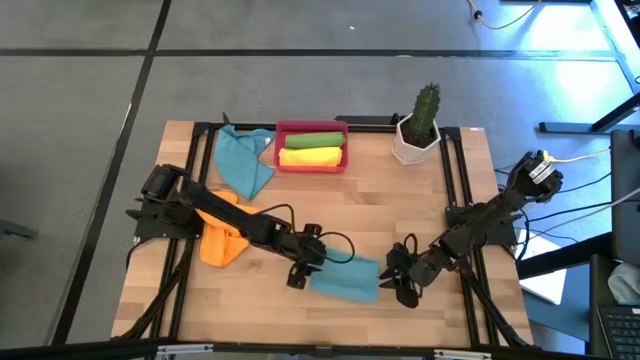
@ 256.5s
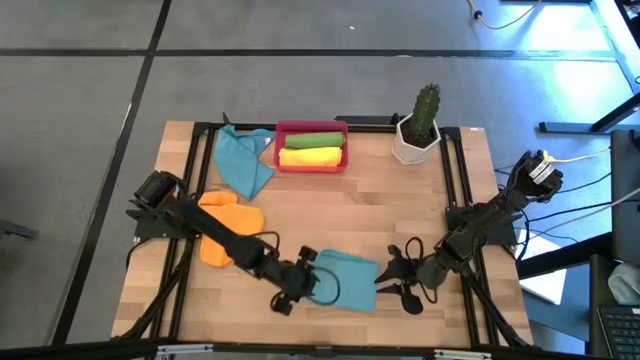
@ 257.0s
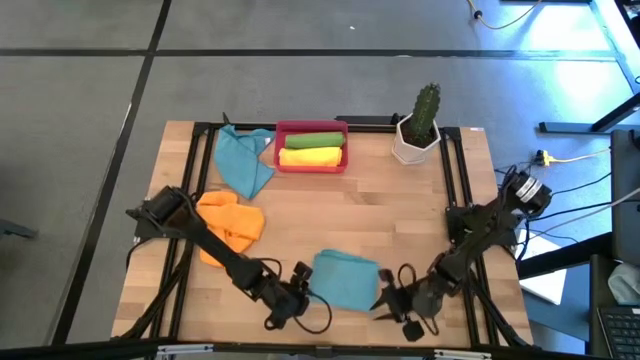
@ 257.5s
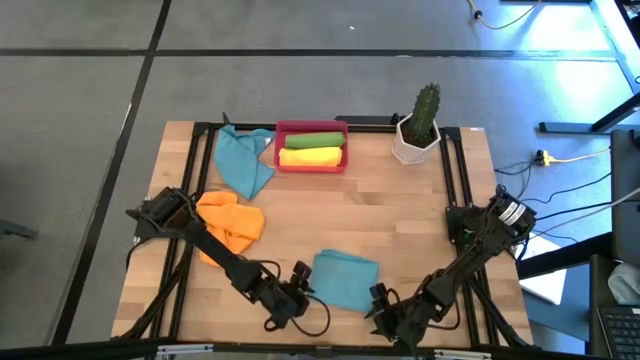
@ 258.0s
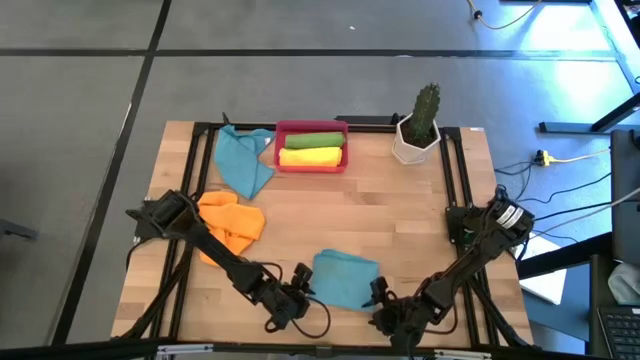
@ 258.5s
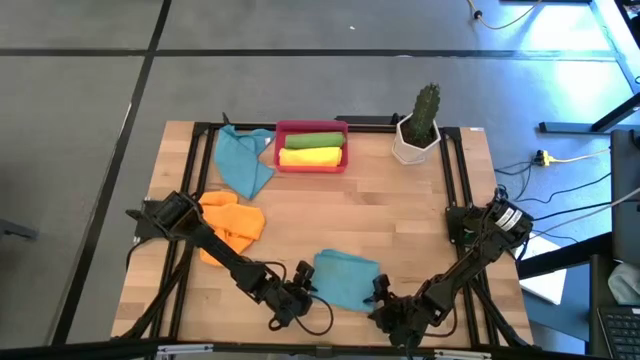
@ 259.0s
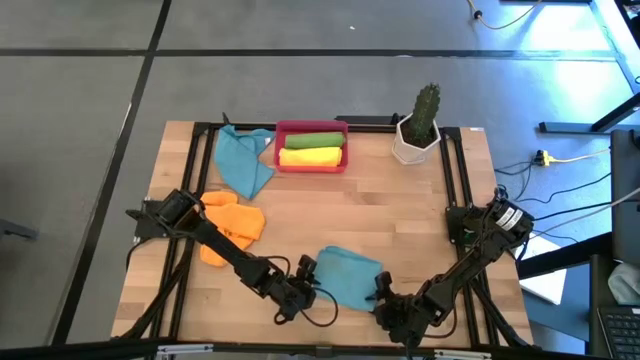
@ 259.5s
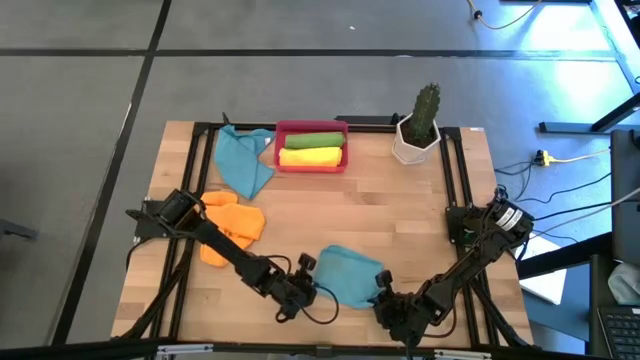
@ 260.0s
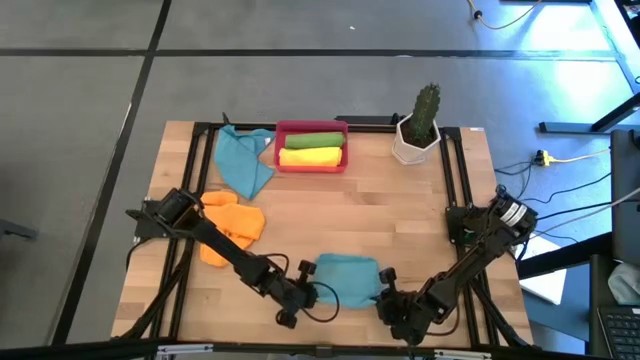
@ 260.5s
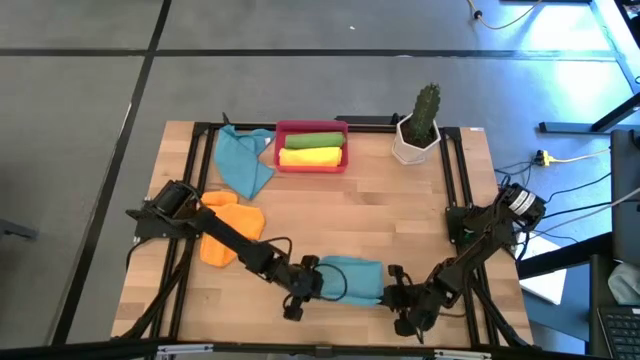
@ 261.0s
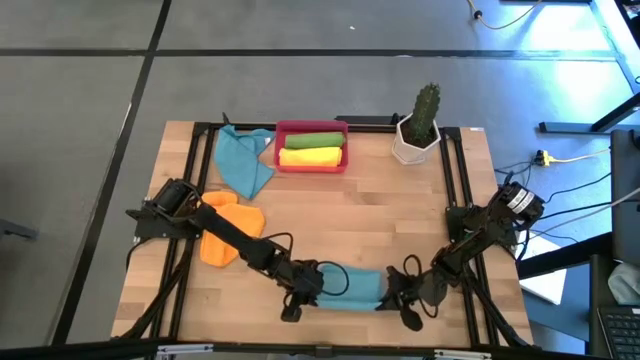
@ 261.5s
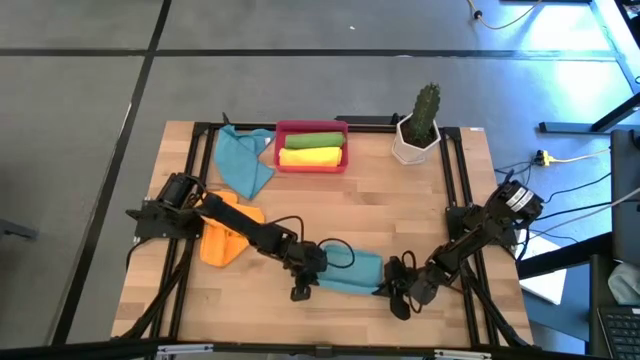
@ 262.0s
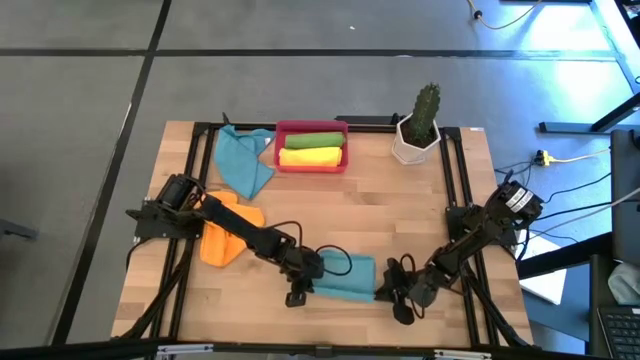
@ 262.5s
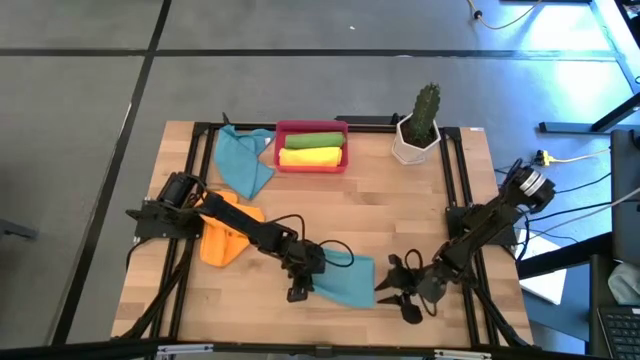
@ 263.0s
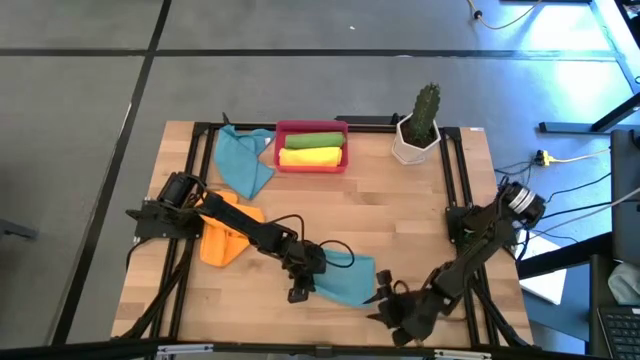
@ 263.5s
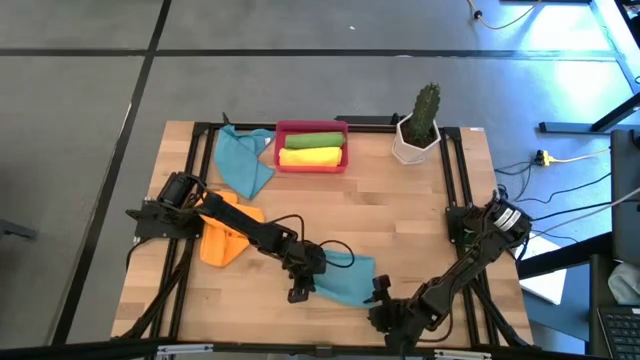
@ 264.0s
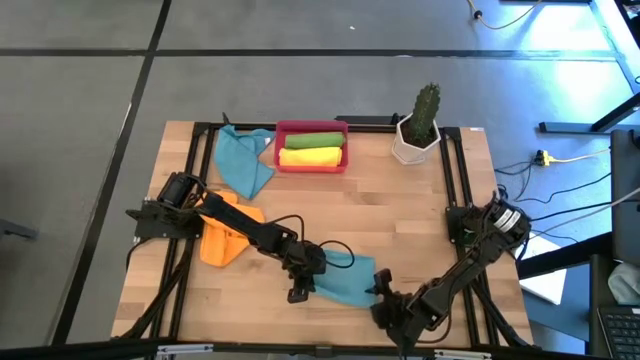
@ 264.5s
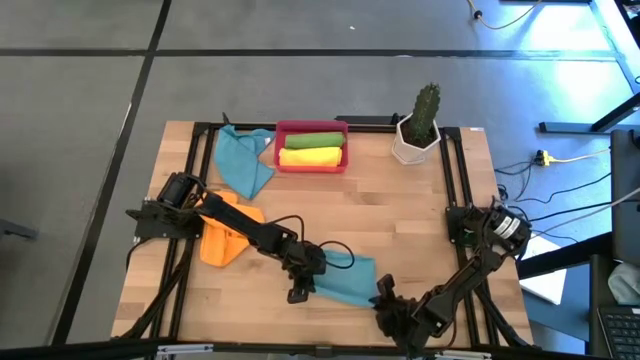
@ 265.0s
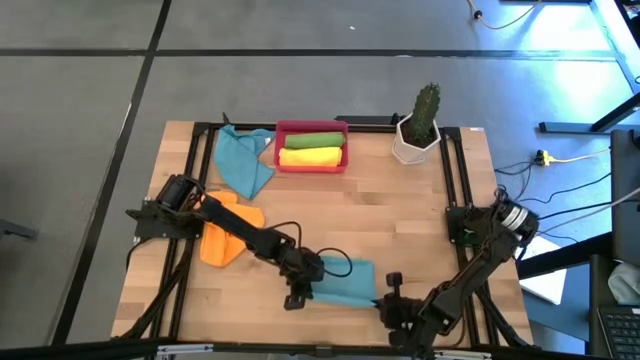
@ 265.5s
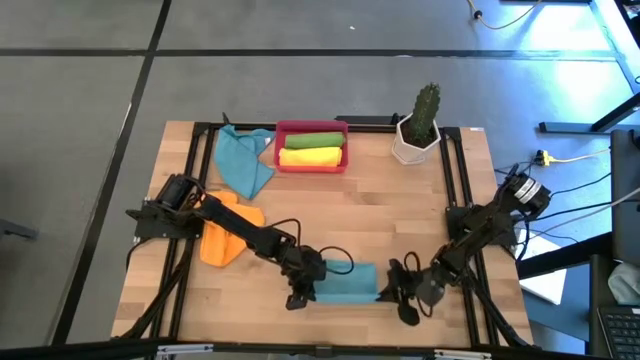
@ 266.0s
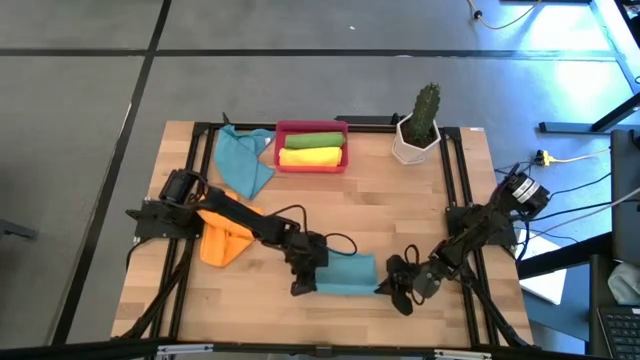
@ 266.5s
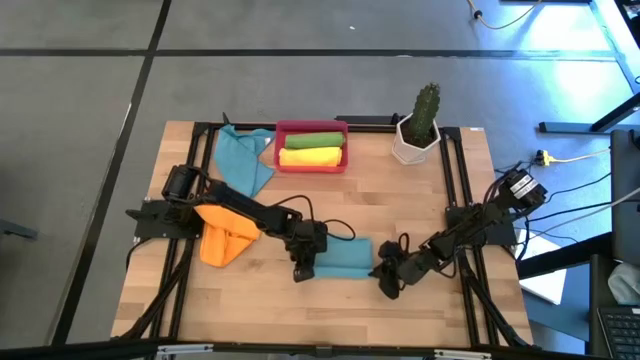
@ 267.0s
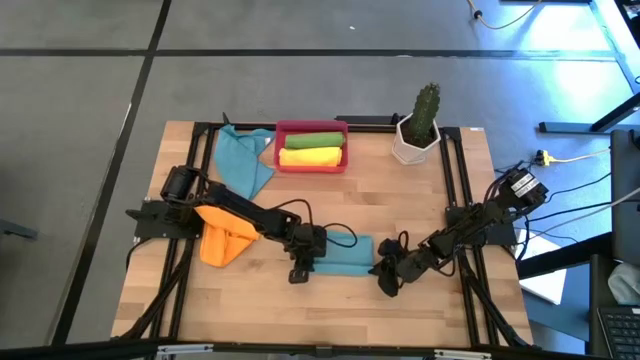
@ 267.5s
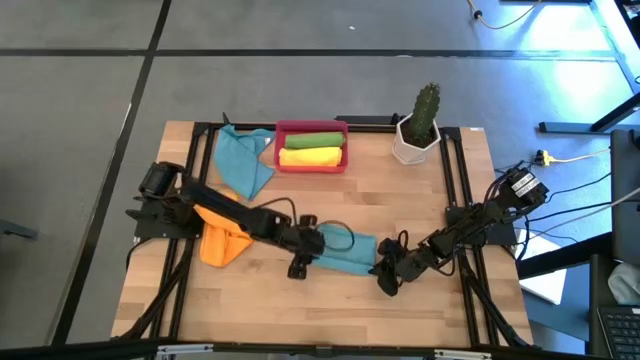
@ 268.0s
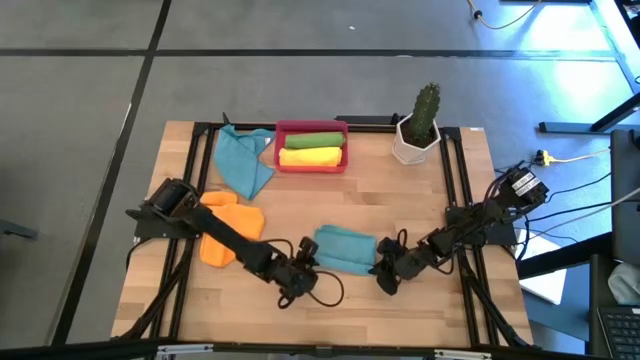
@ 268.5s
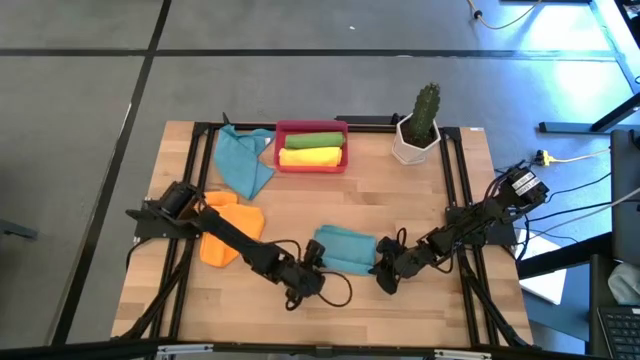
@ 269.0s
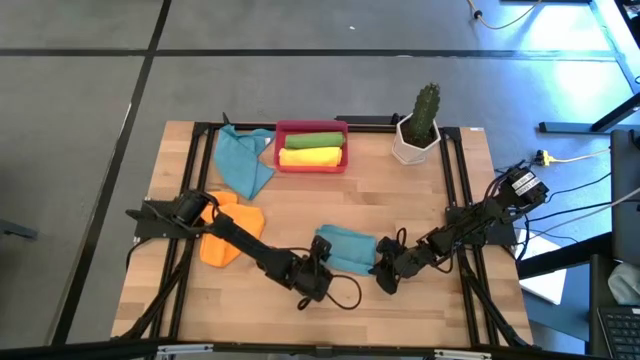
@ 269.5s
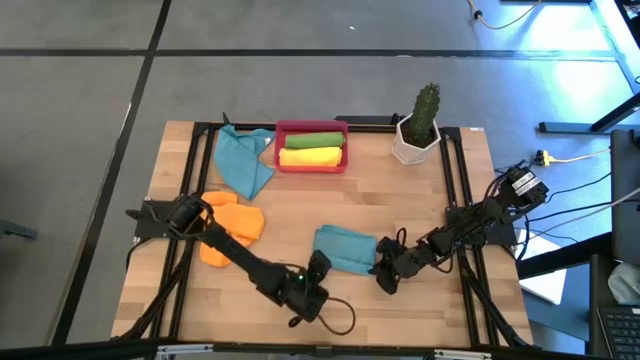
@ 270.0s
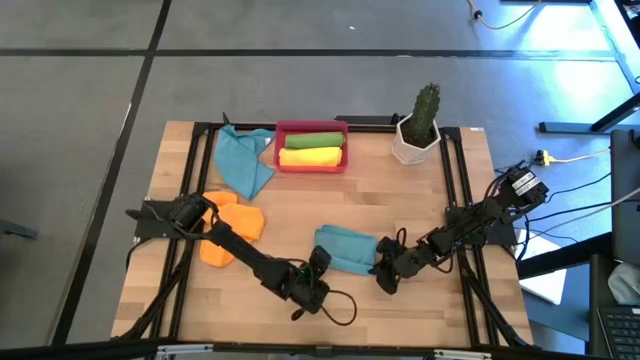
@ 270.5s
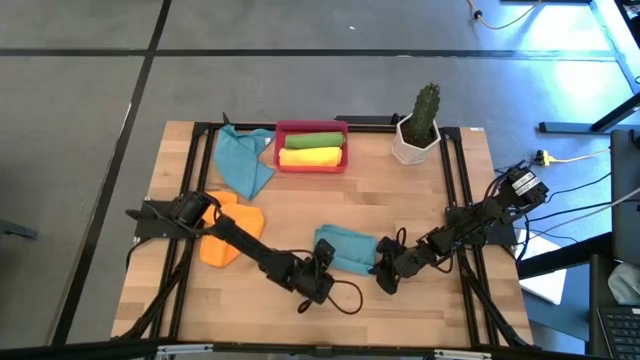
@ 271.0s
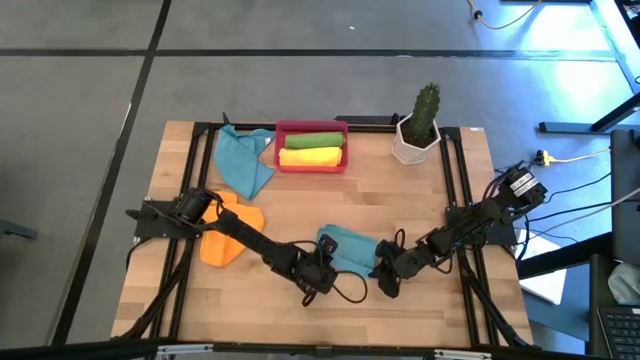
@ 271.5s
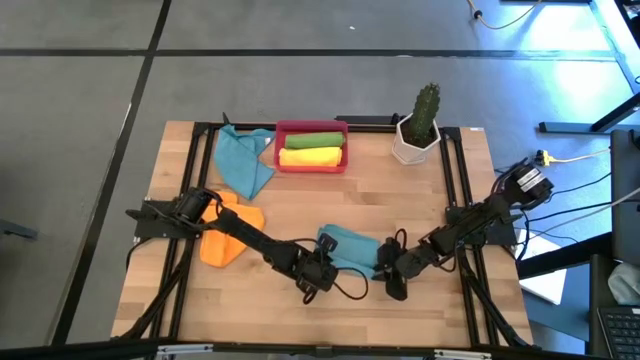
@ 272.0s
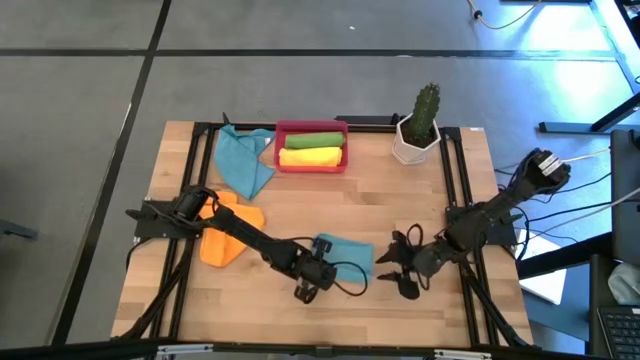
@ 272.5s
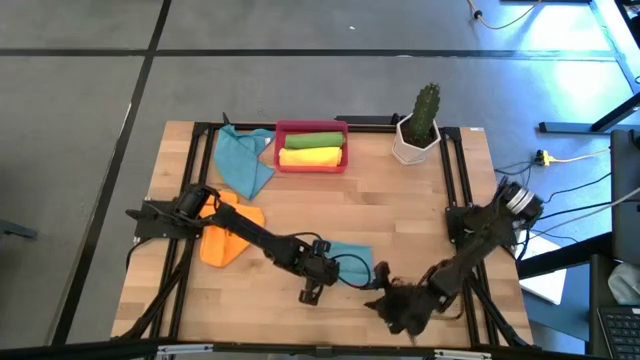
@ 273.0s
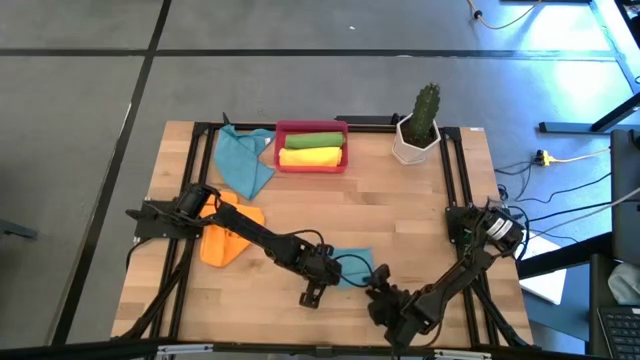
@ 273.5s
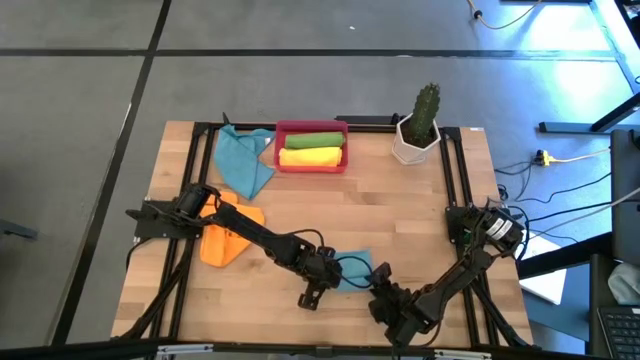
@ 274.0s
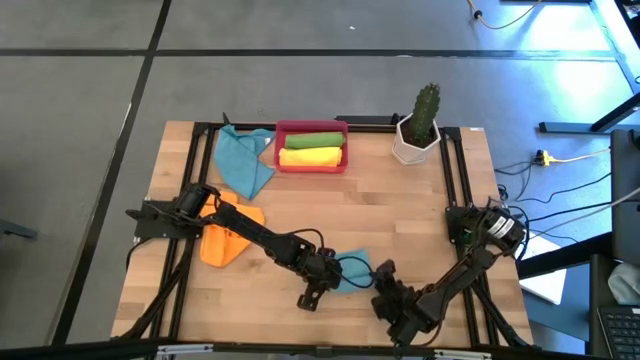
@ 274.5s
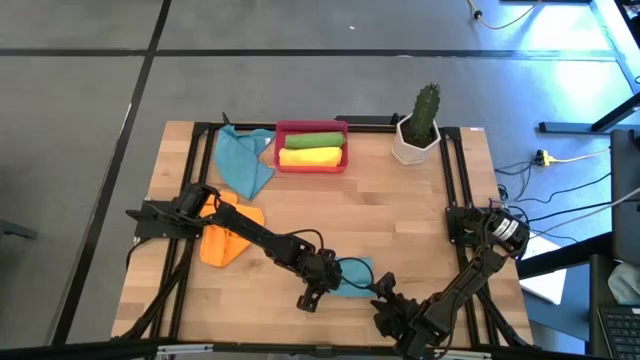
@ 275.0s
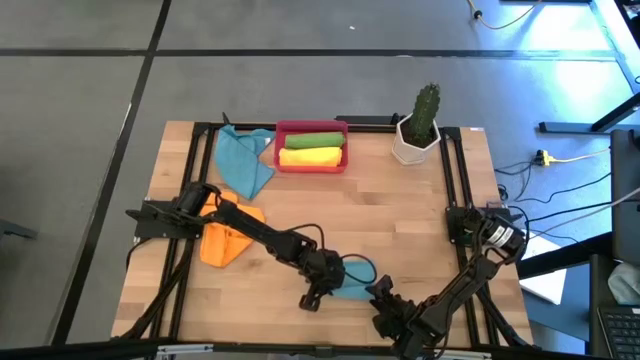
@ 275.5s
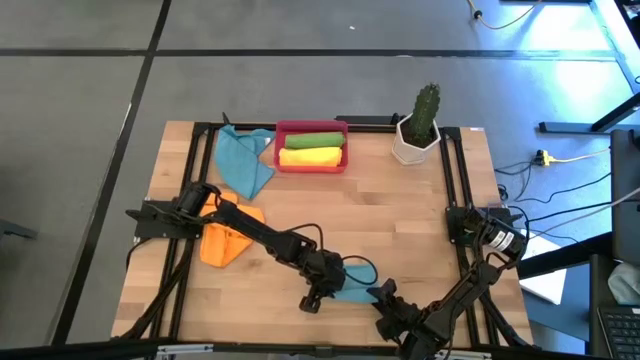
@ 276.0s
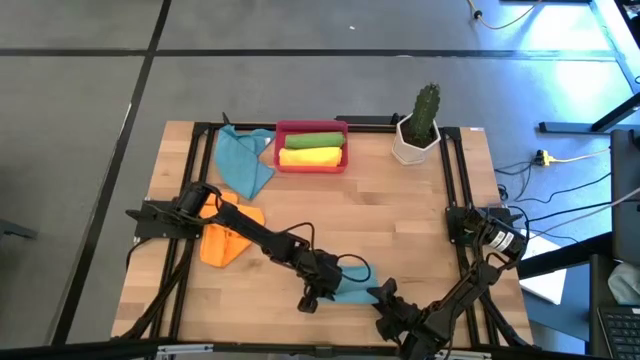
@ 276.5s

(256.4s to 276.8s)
Task: Roll microfiber towels into tight, uniform cylinder then place into a basket
Roll the bottom blue towel

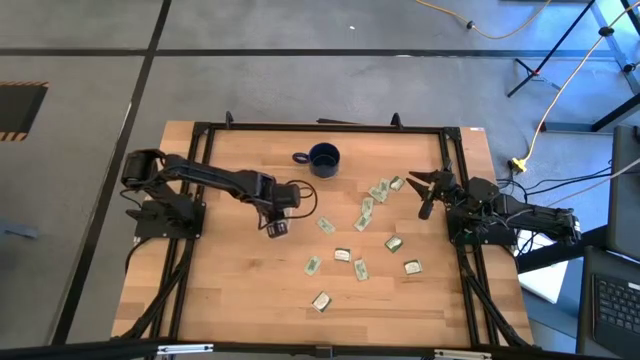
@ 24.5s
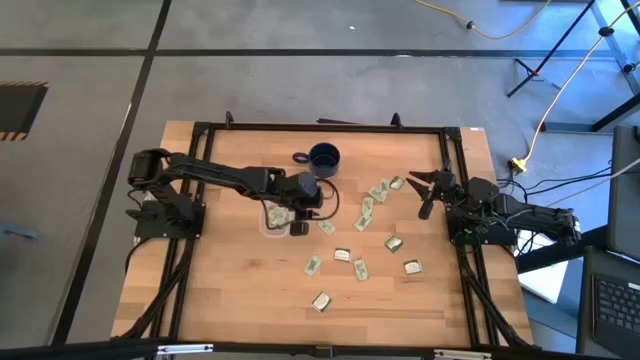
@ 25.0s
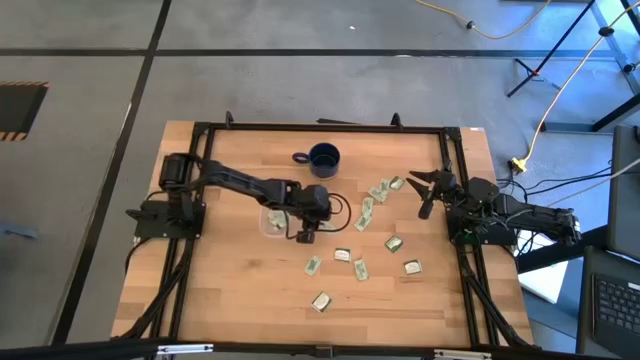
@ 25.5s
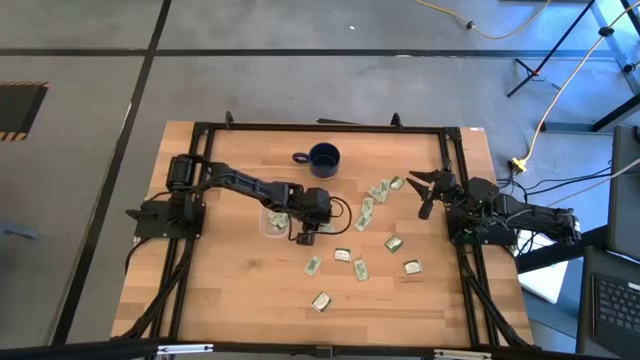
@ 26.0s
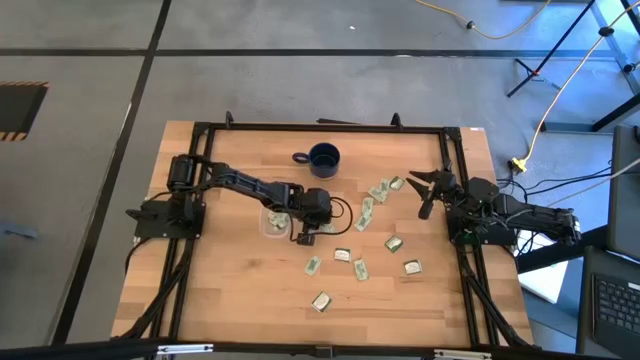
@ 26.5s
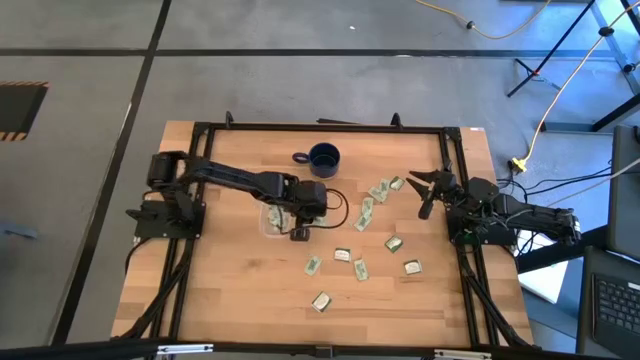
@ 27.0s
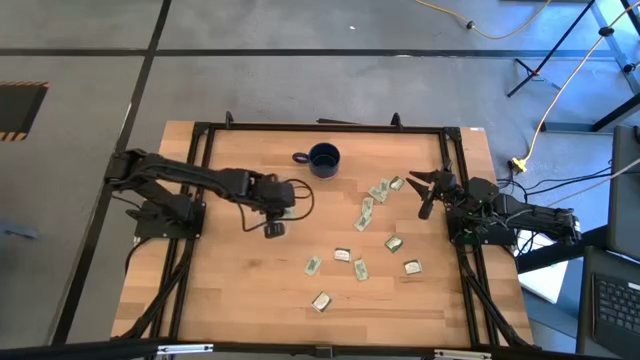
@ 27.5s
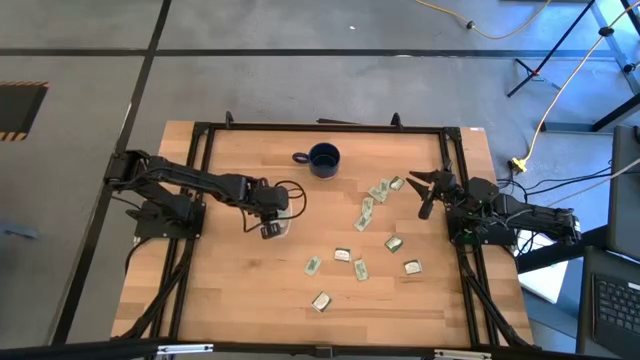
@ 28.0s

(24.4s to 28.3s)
Task: Pick and place Stevia / Truvia into bins
Put the white stevia packet into the transparent container
